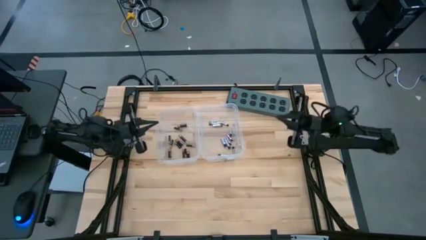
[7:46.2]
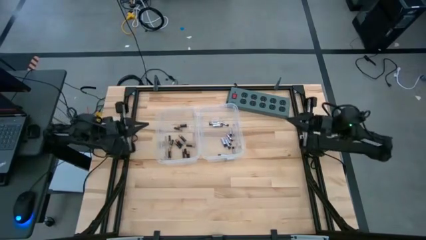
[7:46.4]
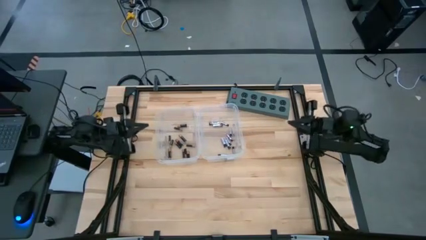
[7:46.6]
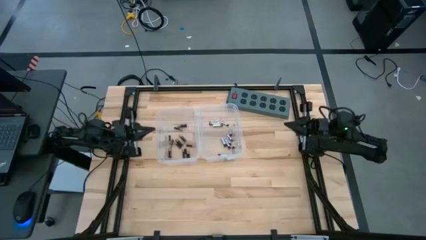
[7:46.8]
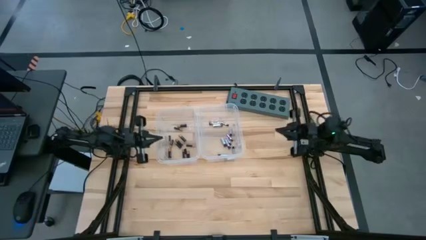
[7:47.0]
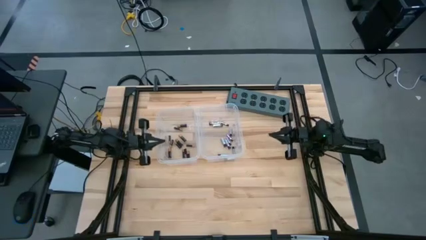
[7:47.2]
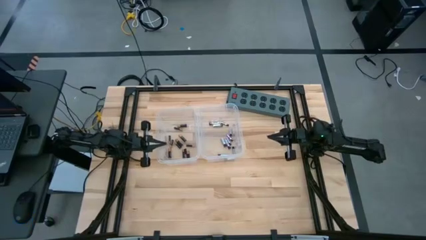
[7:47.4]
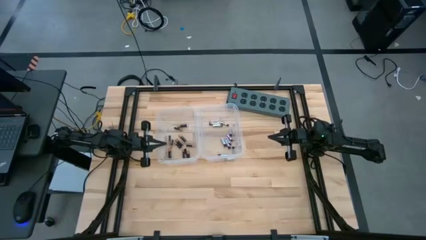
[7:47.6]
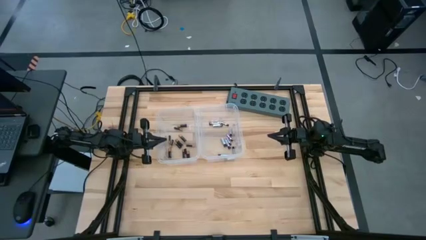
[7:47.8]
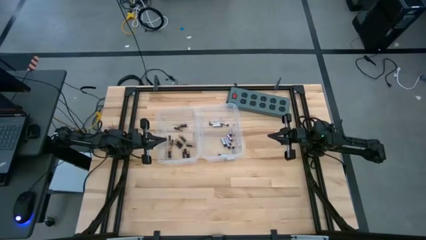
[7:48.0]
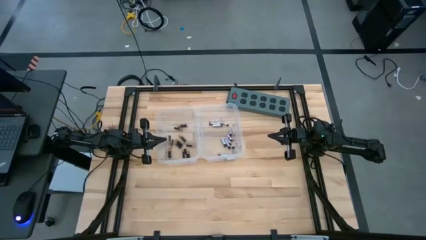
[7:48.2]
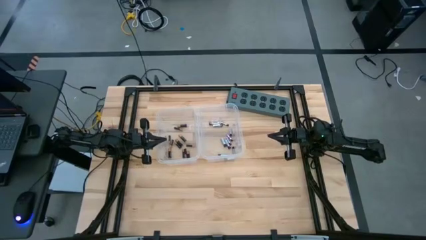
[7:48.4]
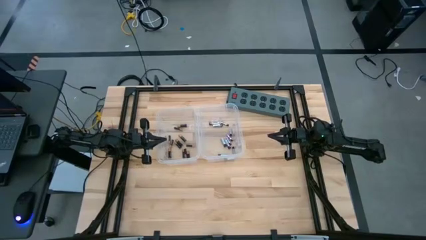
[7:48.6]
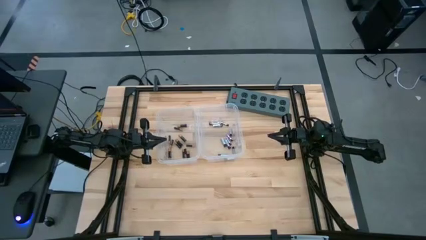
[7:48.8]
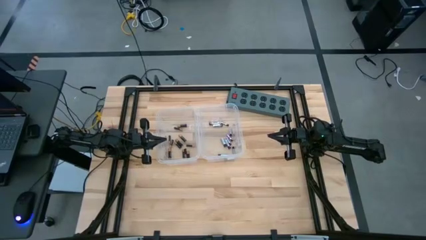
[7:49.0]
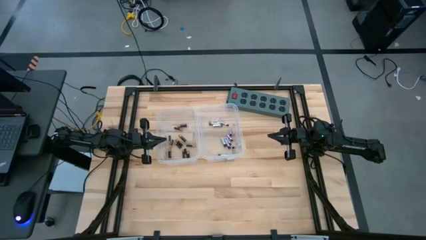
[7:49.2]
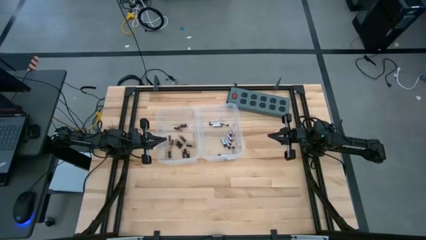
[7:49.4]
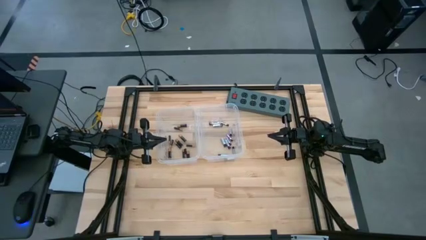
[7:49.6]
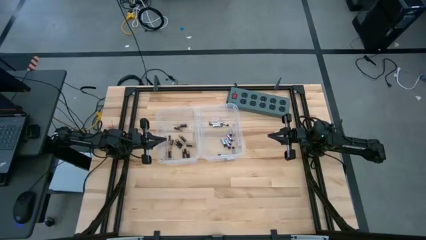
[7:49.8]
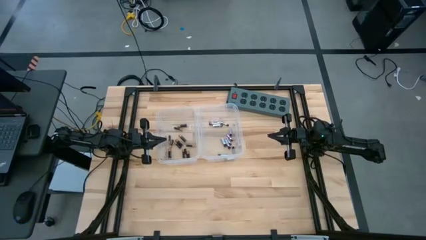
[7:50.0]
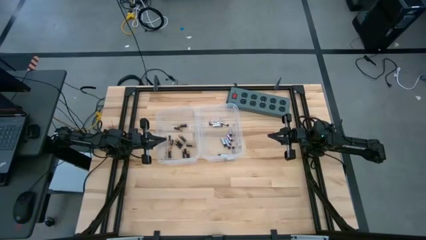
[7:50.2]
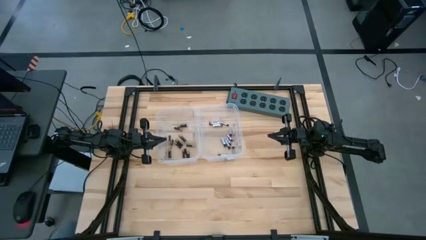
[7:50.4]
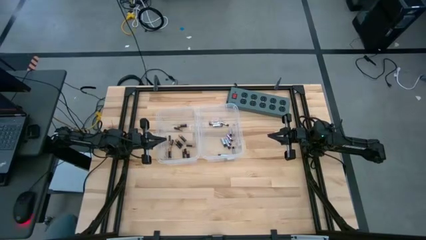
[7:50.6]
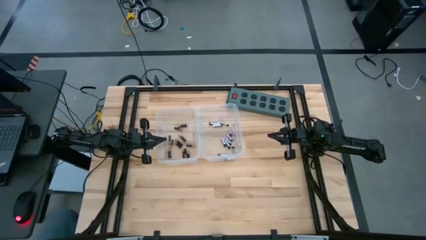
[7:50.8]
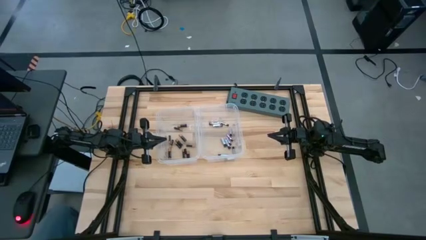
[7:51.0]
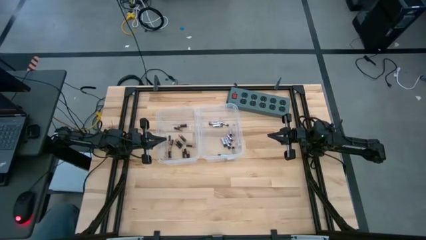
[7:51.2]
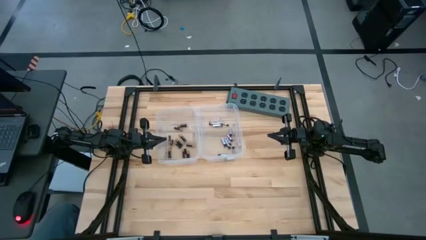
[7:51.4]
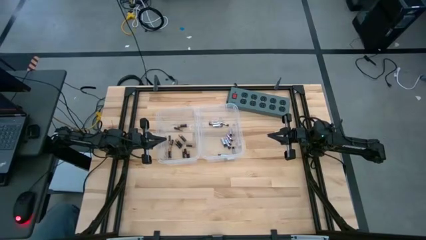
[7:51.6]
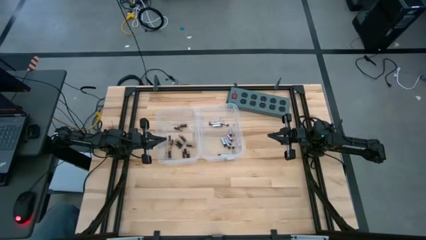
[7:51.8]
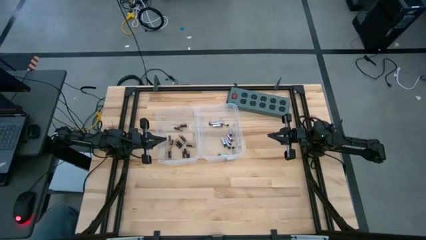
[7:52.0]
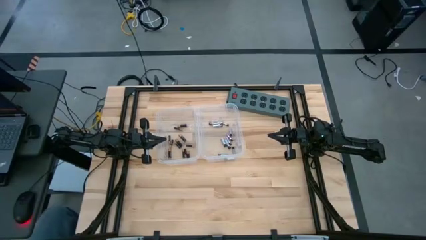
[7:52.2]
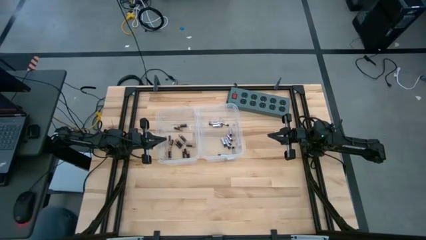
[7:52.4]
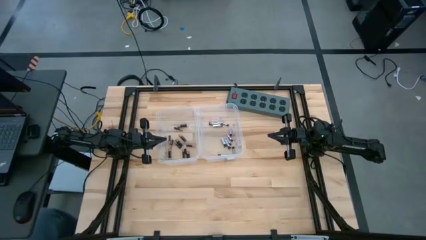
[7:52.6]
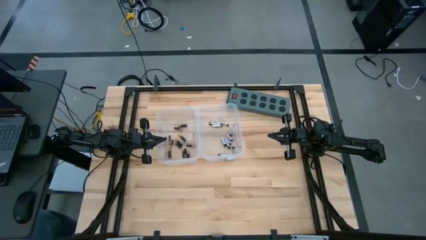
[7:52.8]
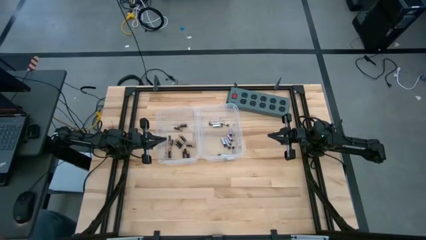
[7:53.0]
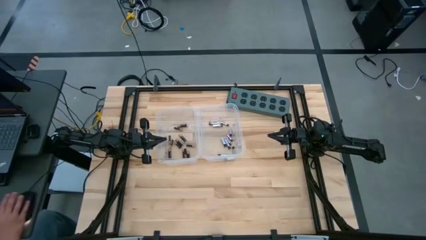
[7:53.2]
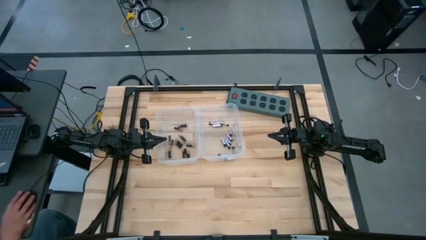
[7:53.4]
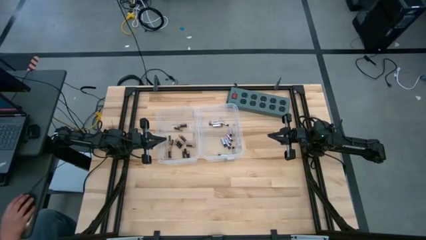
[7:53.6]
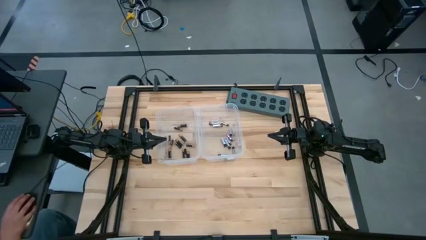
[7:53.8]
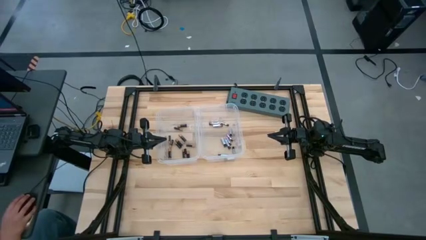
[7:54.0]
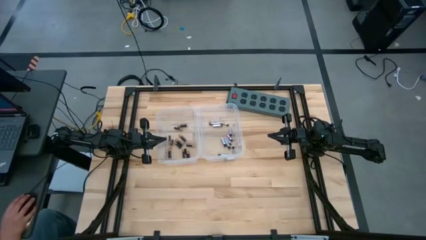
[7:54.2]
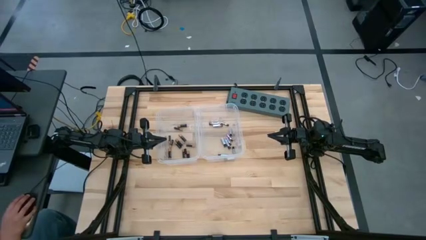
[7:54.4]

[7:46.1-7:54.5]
Task: Sort batteries
Return to Home Position

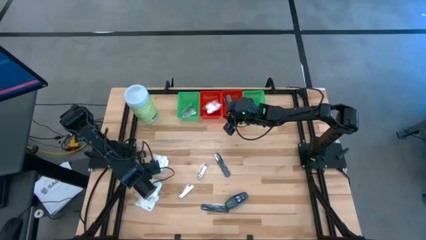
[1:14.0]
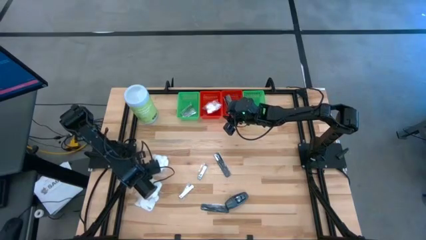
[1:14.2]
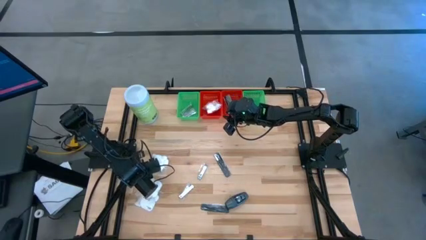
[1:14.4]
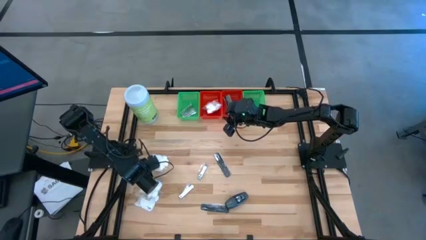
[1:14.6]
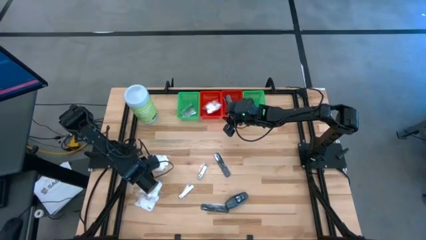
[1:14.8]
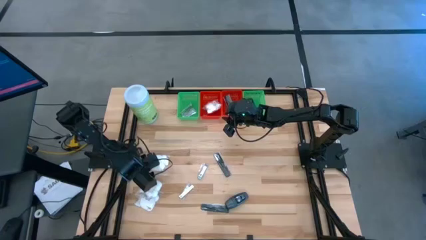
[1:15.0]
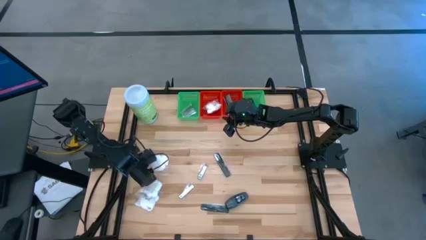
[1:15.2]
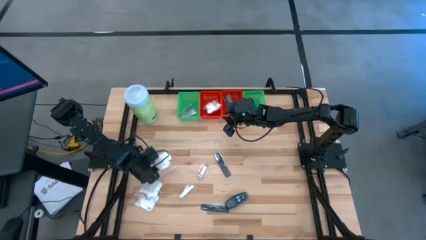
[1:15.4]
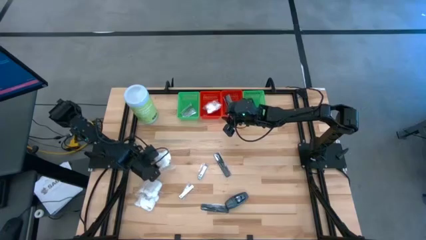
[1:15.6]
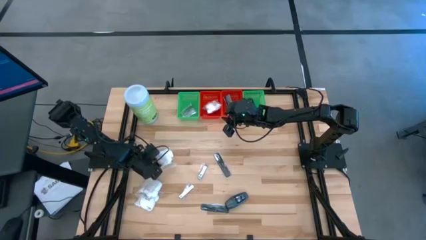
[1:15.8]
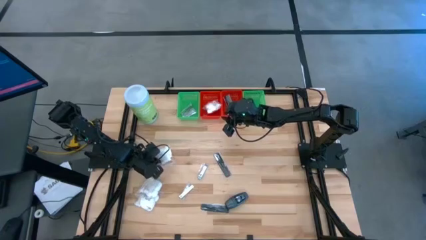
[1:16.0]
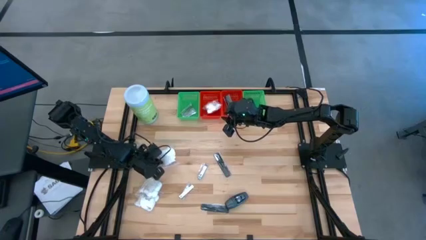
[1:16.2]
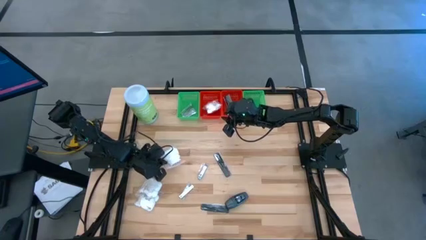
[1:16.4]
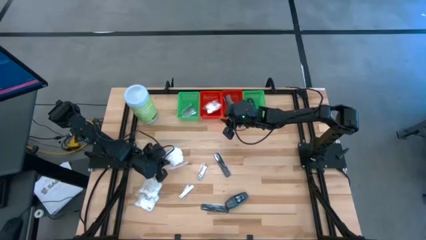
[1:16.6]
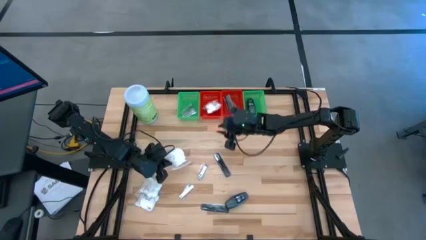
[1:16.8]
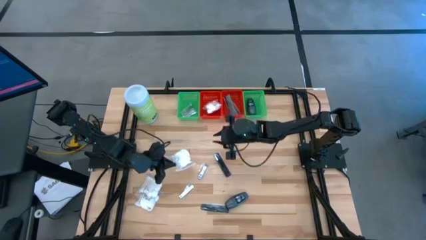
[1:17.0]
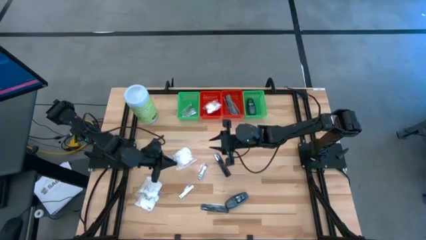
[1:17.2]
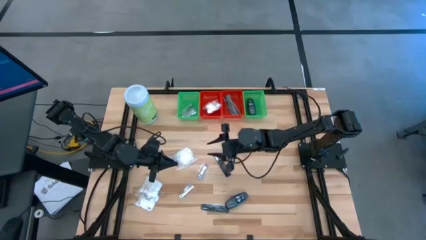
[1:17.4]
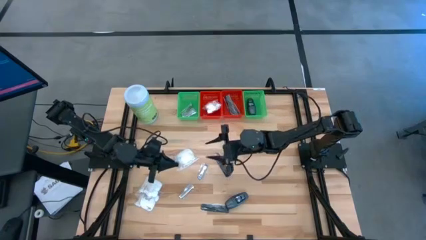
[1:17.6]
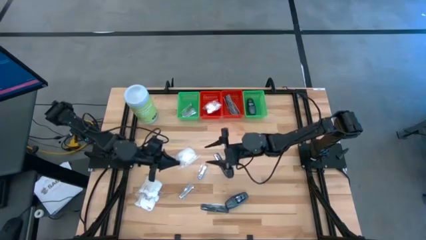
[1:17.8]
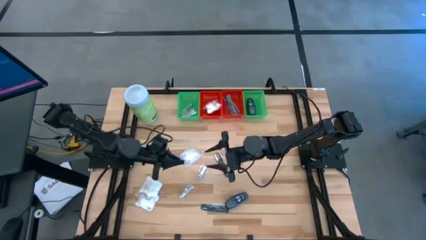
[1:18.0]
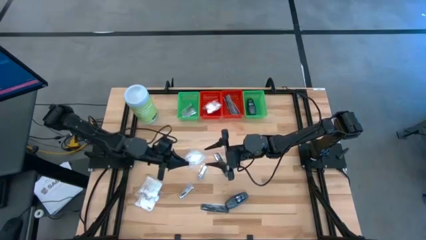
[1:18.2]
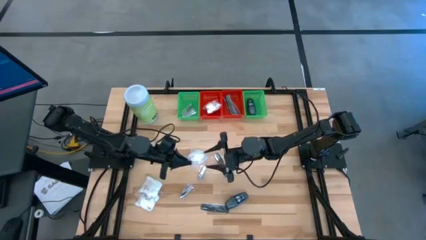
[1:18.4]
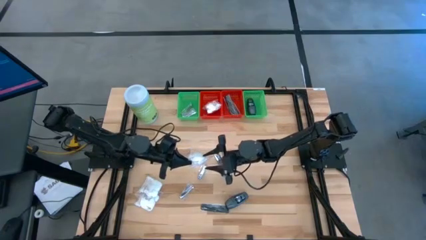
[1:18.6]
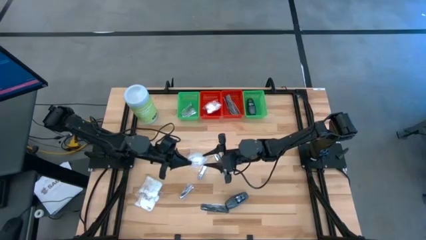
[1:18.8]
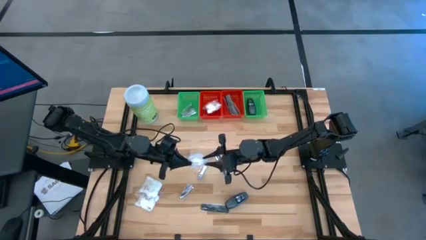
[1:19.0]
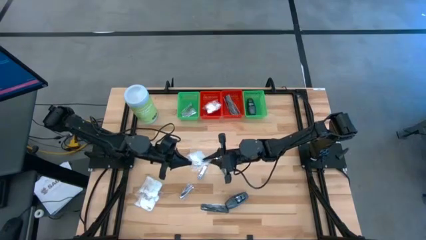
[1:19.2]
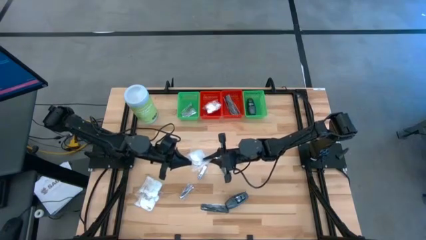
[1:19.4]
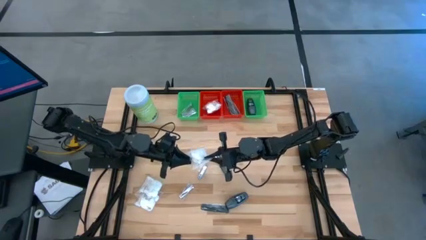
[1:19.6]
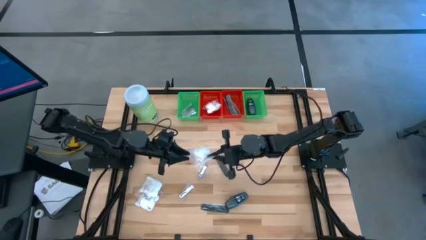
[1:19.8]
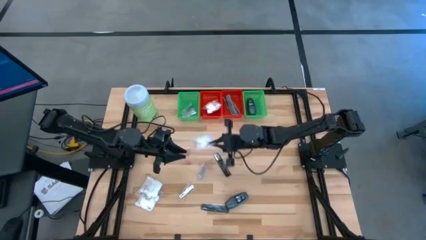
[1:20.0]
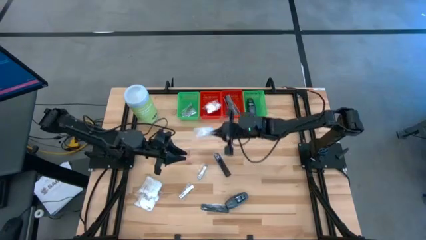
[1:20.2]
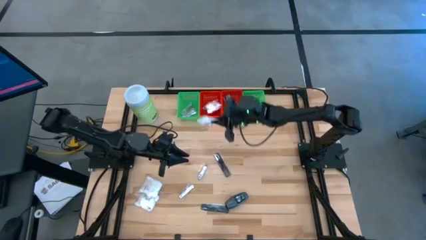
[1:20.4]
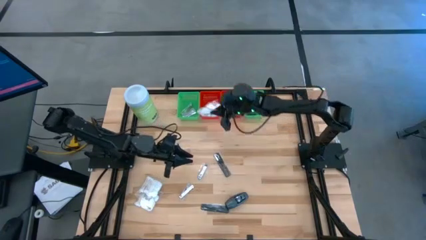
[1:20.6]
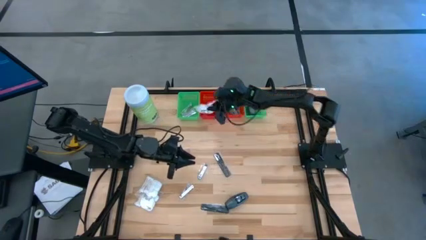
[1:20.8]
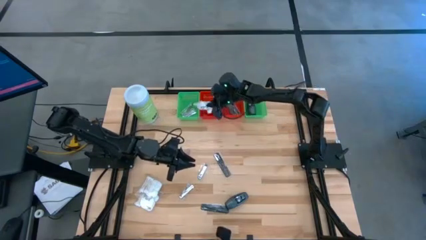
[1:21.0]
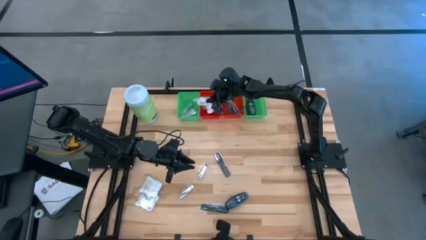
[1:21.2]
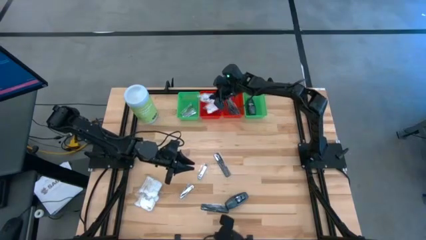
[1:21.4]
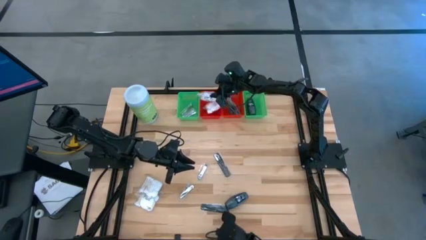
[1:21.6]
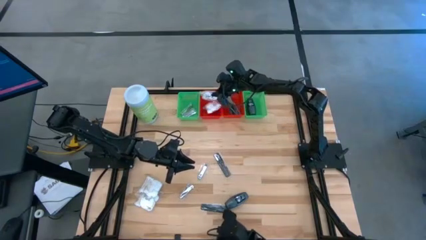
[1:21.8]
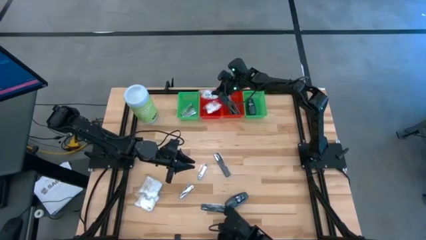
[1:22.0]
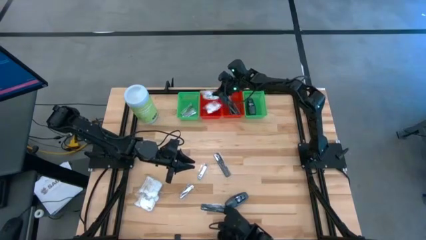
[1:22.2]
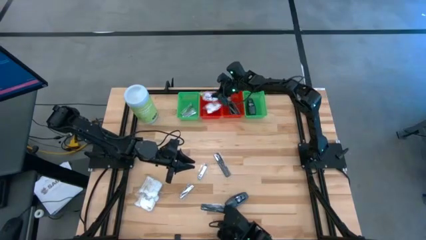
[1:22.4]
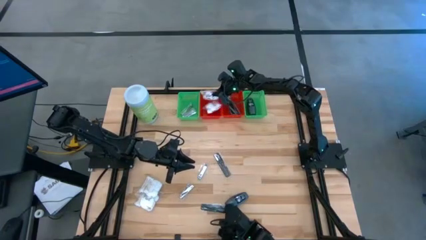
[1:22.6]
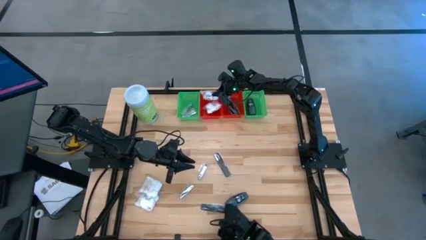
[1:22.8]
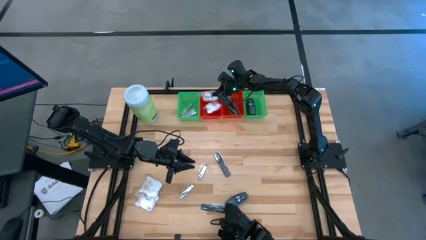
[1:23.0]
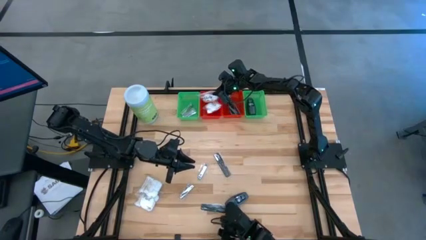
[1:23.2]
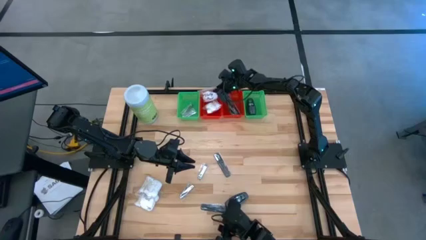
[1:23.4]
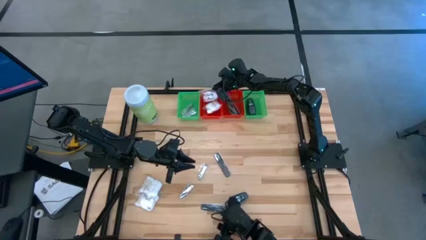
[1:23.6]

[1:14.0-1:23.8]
Task: Pick & Place Travel size toiletries
Put the white cotton pack into the left red bin
